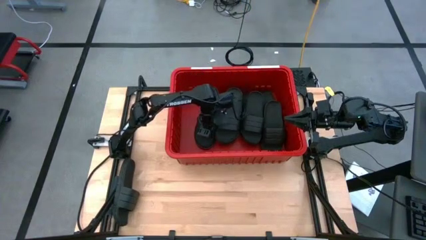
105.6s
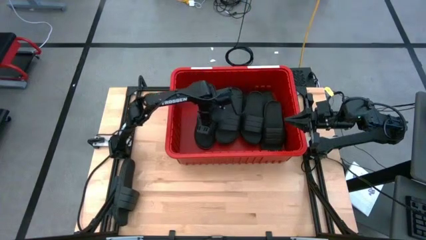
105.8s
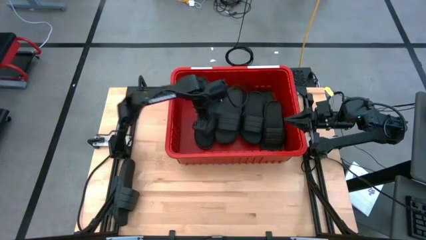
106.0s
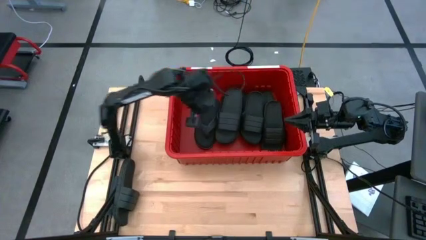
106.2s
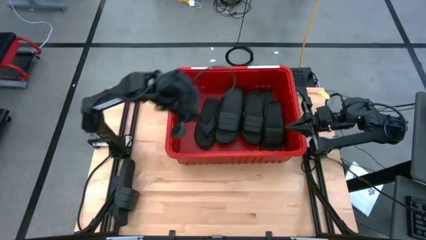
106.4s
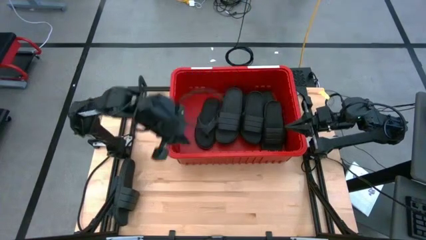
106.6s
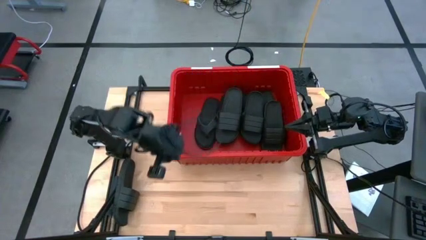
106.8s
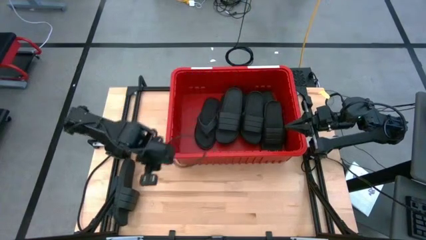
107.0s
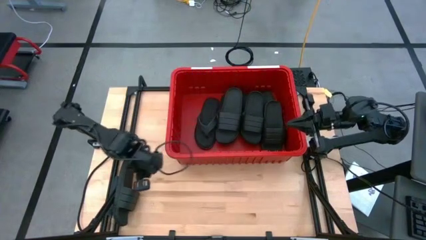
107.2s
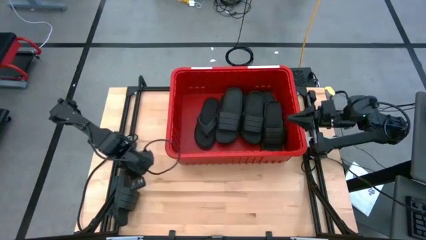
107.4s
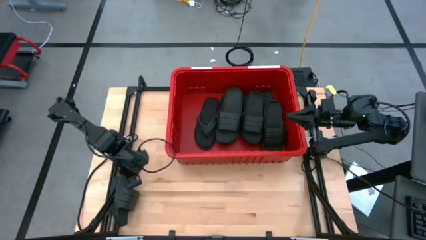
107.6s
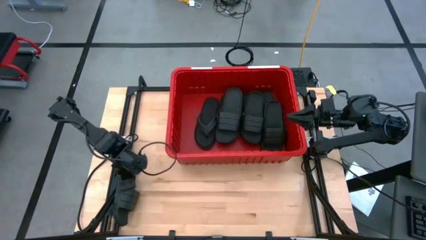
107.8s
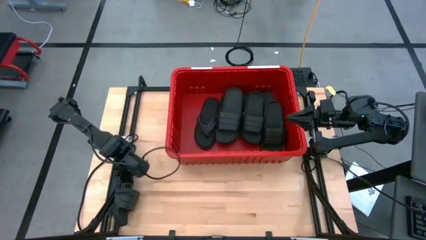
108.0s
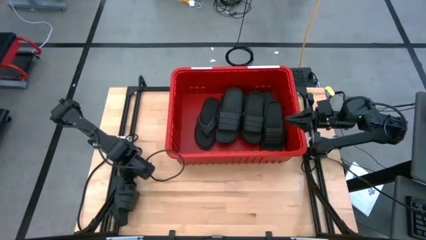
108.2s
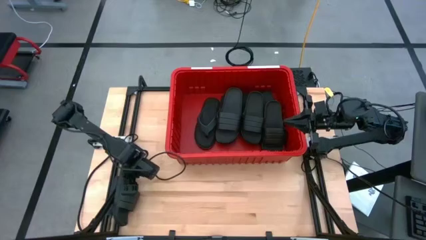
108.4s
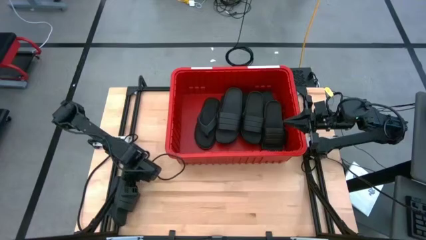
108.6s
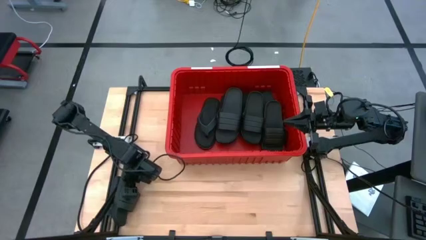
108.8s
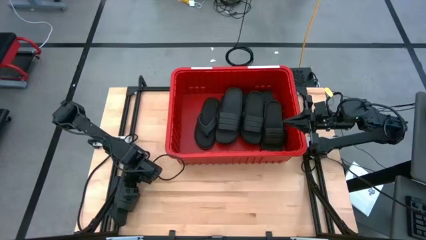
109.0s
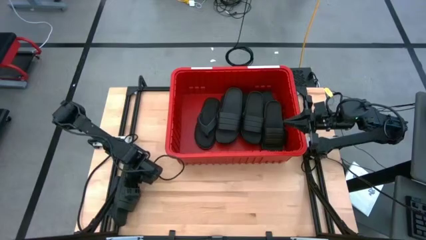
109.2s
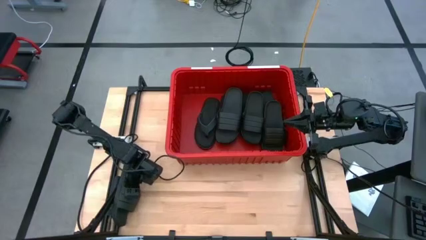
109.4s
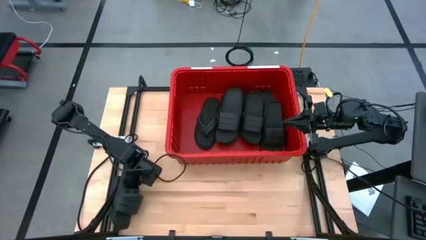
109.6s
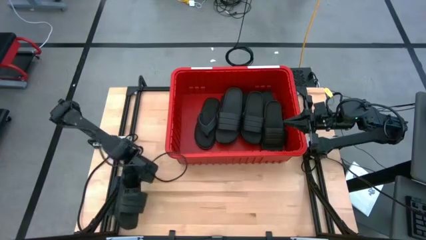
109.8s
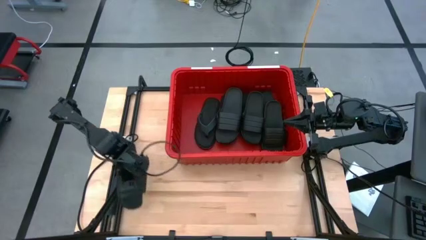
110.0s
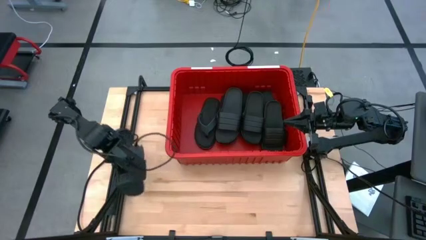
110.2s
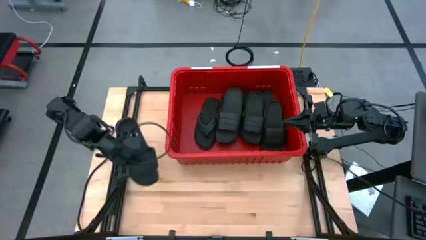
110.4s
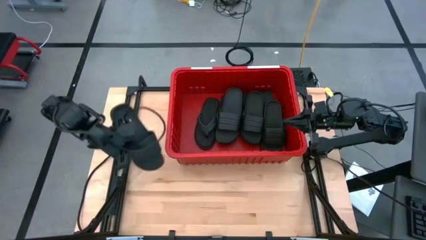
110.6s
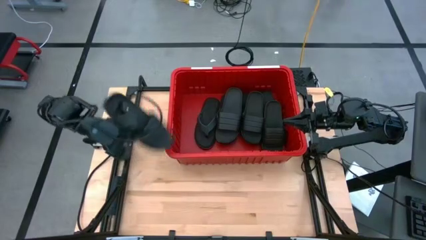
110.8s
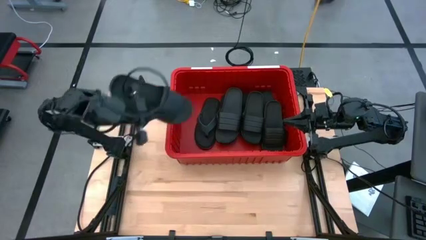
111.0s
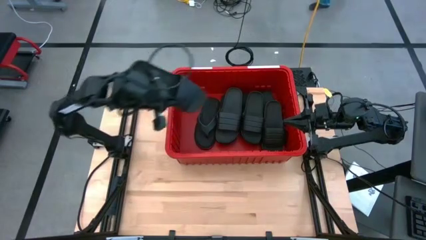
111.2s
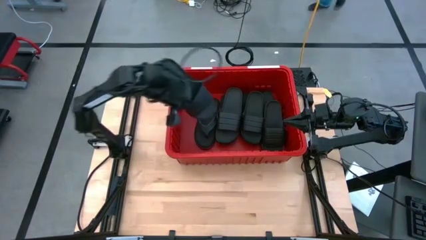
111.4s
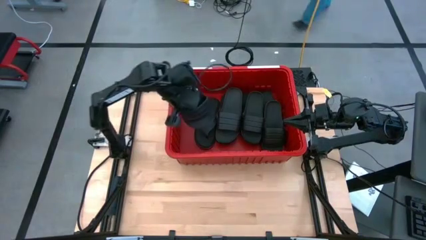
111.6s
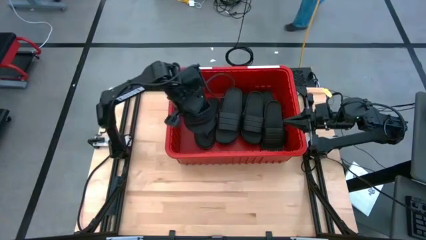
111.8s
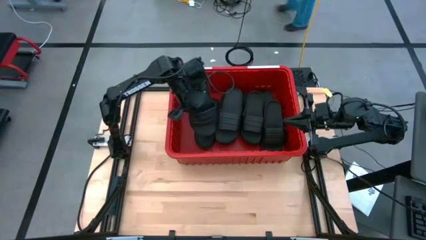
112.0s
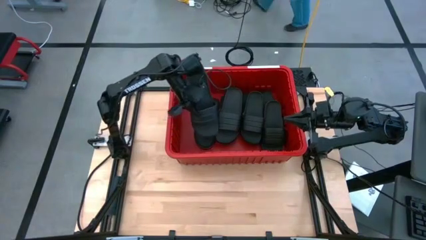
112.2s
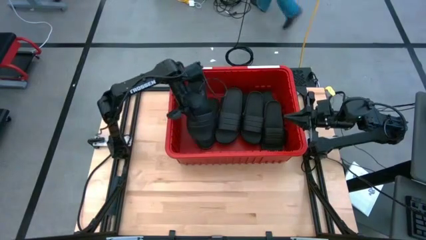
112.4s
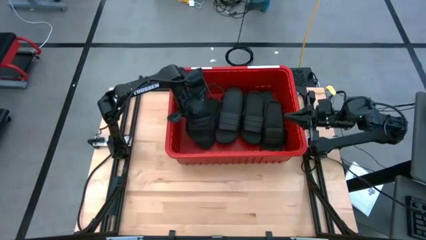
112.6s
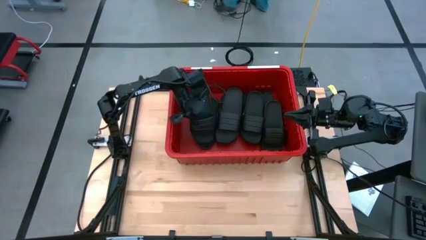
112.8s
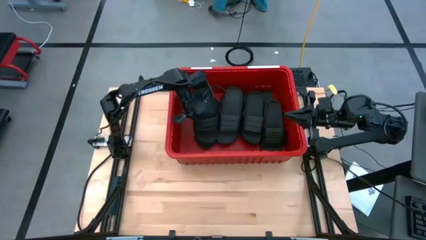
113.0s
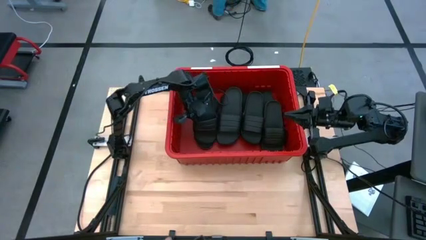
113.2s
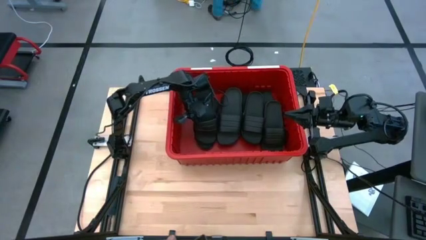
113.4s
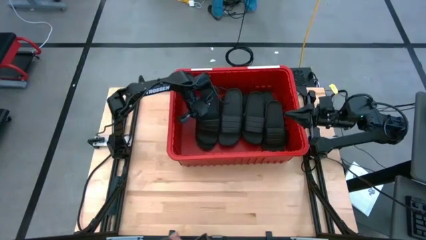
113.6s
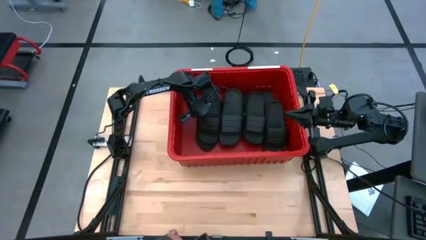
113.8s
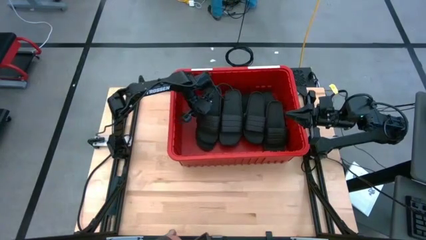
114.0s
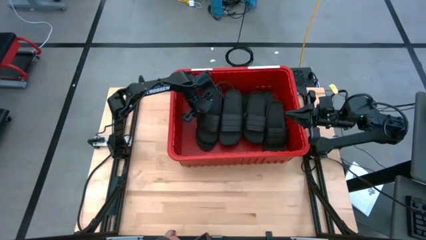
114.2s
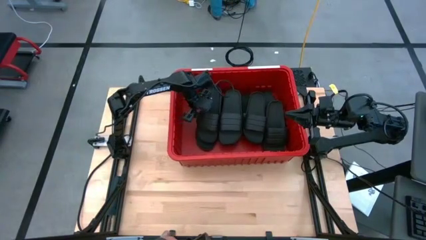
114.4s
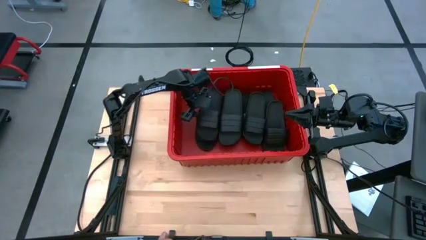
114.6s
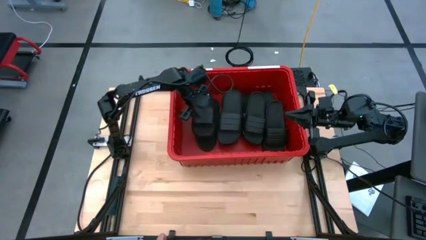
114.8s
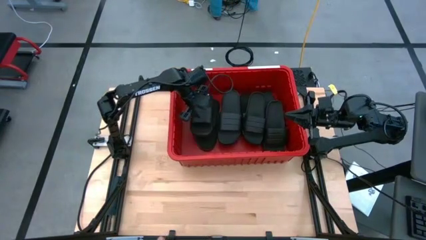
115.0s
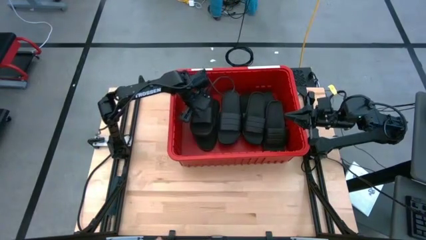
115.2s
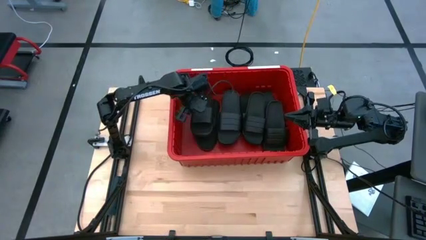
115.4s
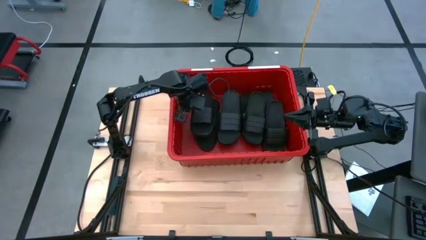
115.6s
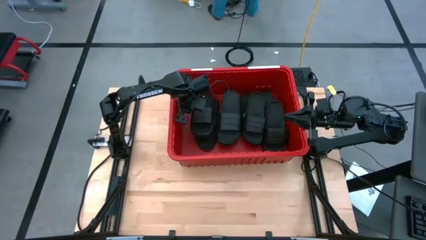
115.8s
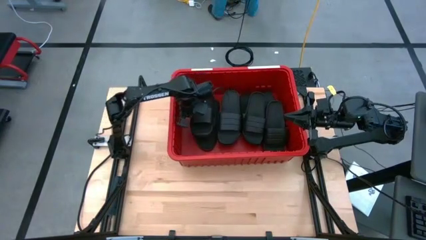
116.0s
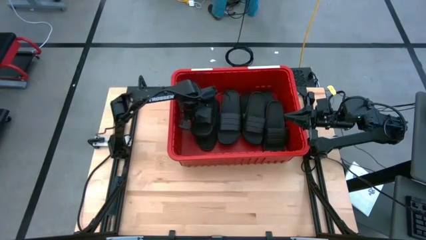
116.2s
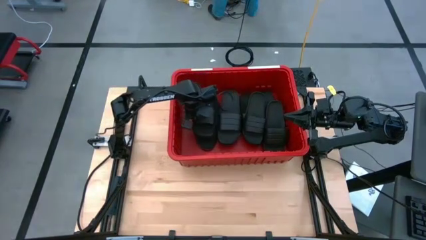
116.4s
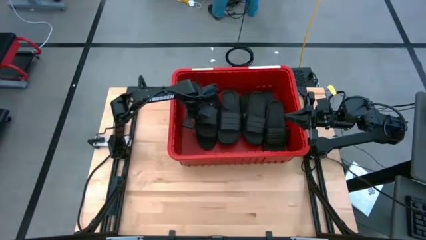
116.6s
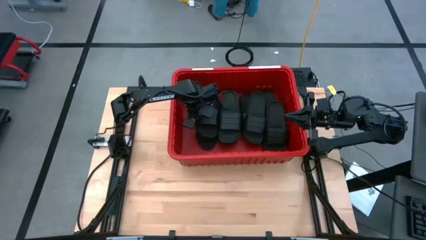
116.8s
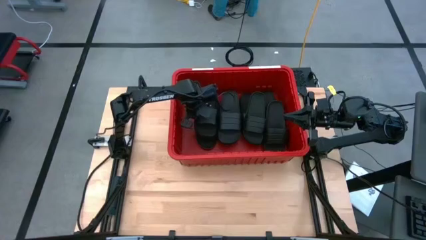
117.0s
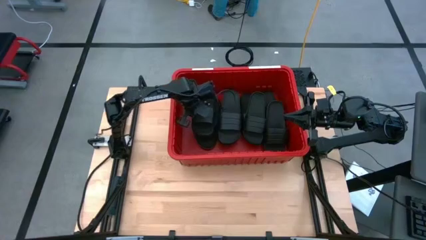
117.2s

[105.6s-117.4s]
Task: Pick and place slides into bin
Put the black slide into the red bin

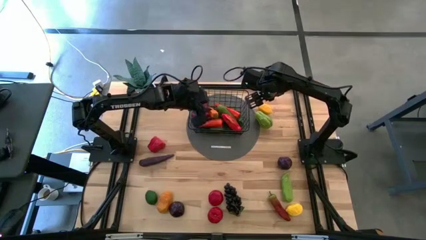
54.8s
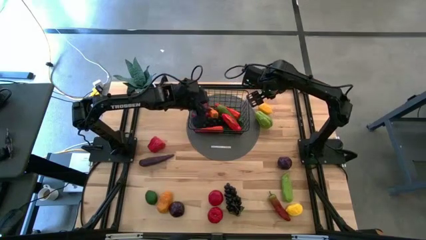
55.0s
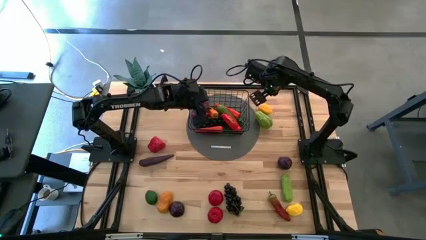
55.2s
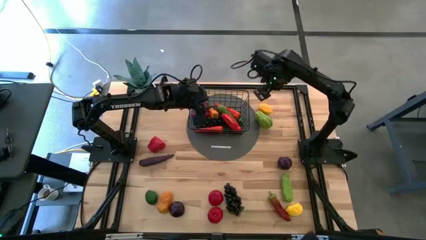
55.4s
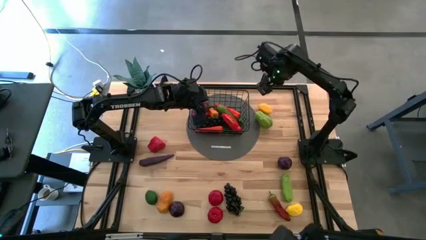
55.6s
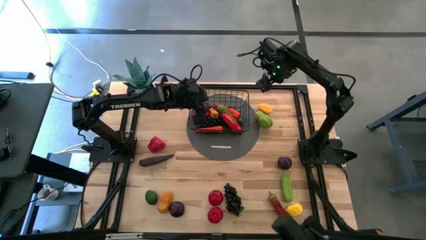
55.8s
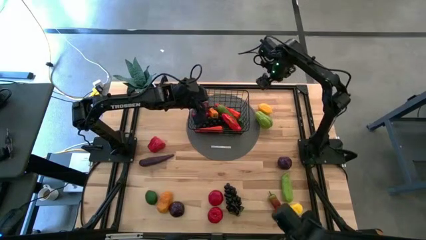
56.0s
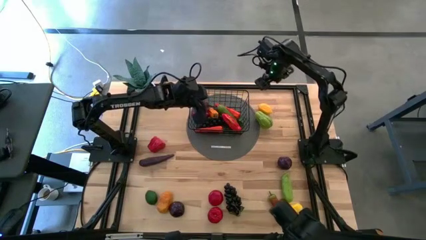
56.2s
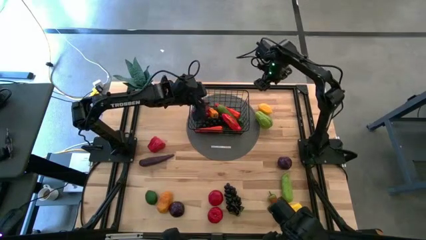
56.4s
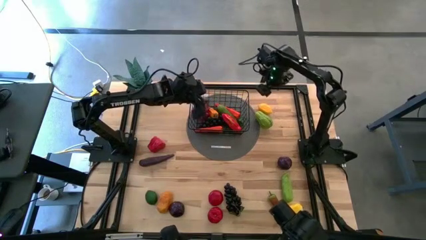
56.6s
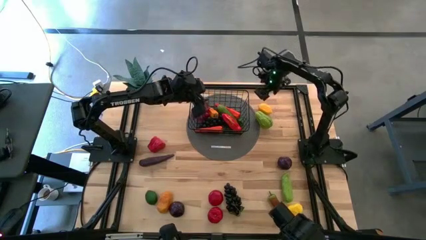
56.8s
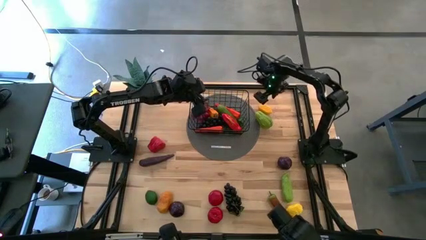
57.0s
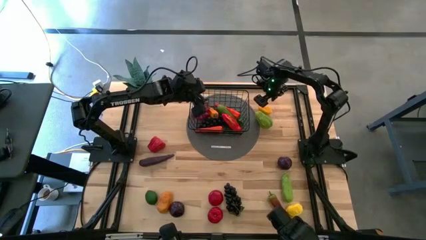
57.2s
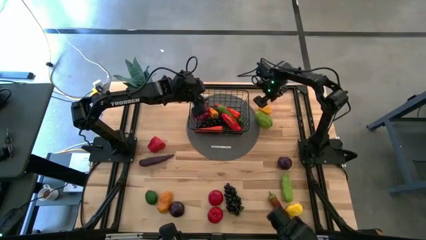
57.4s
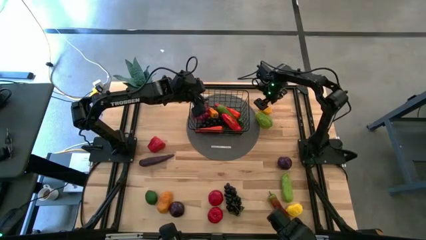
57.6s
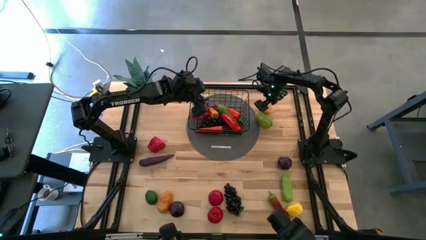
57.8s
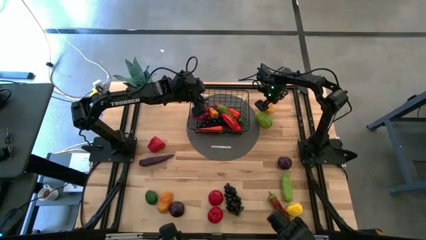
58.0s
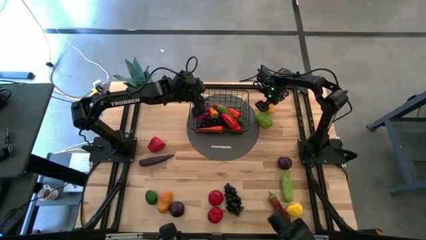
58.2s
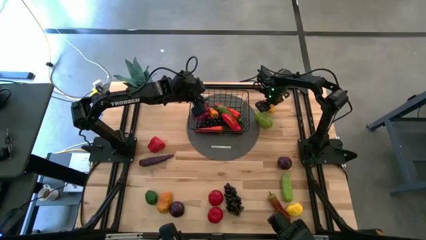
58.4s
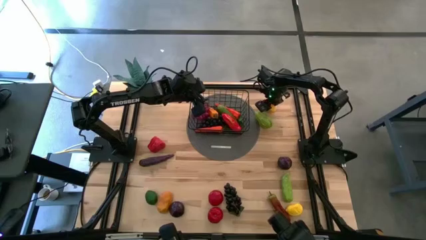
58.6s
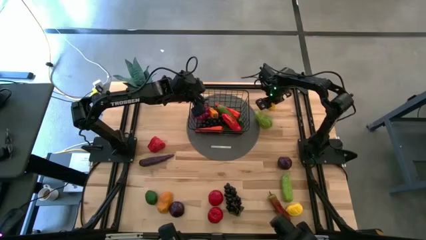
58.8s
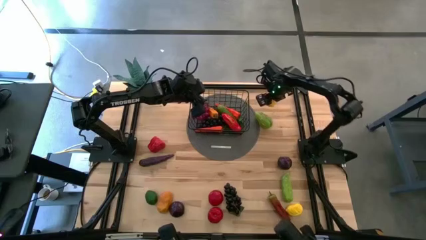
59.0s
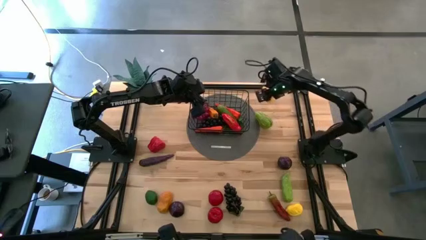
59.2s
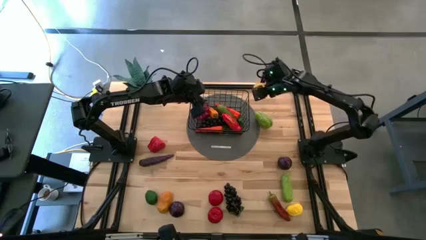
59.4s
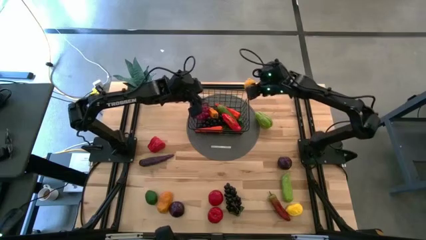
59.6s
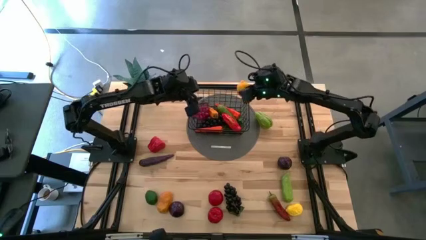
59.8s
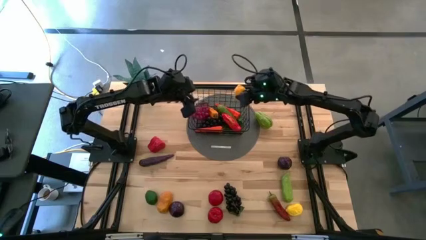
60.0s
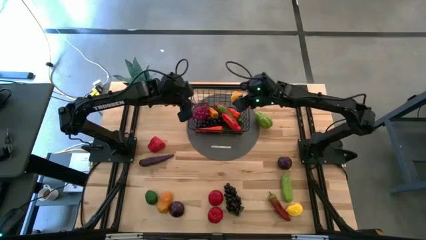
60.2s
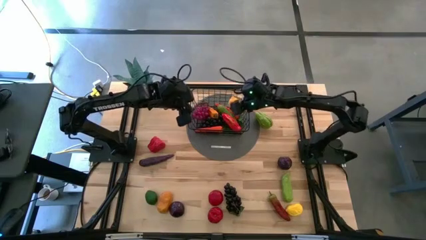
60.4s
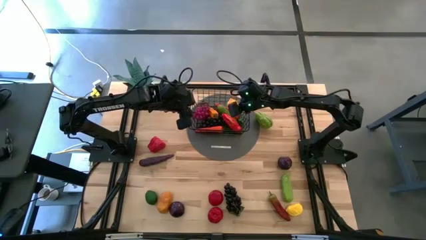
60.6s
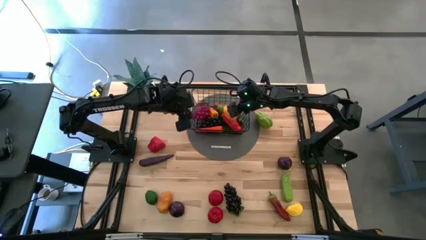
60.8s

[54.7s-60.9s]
Task: Build produce basket
Put the top yellow lemon into the wire basket
